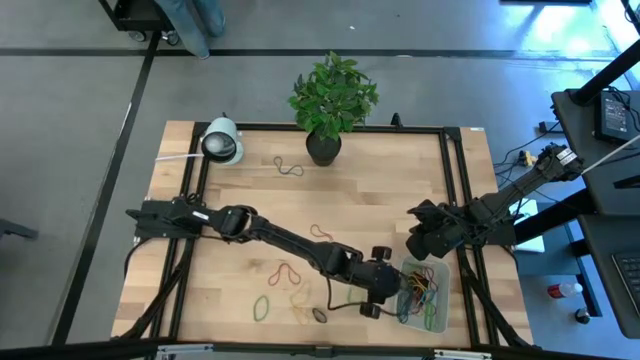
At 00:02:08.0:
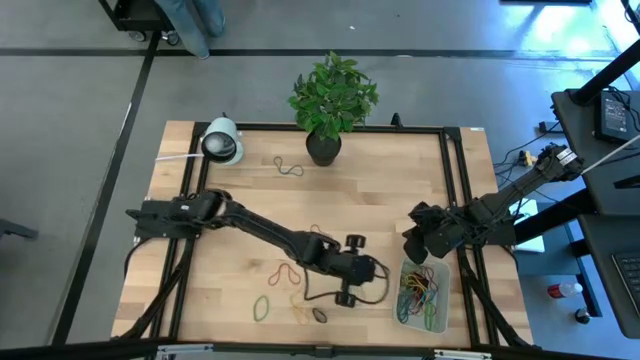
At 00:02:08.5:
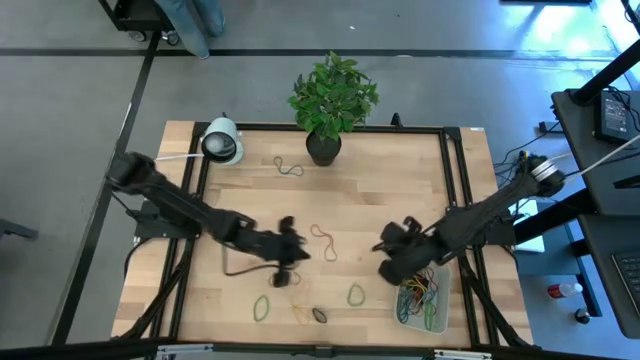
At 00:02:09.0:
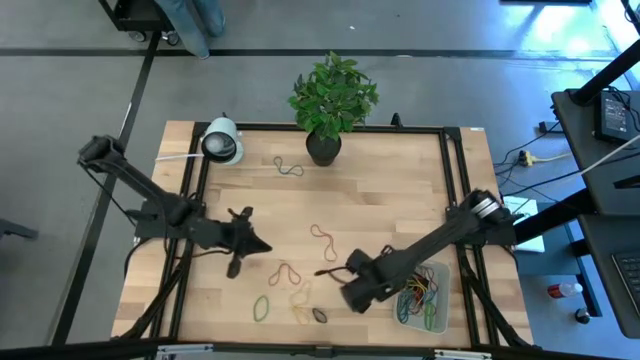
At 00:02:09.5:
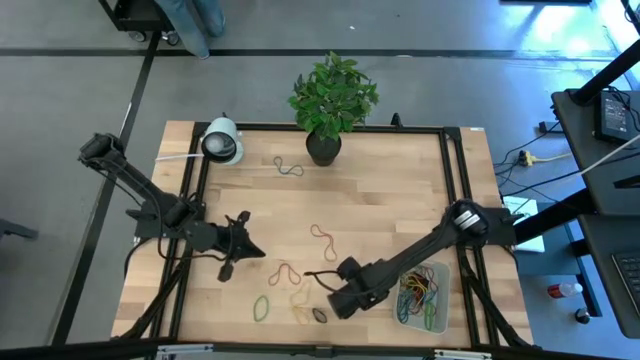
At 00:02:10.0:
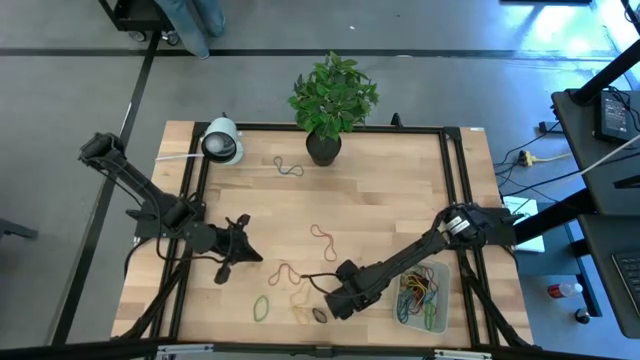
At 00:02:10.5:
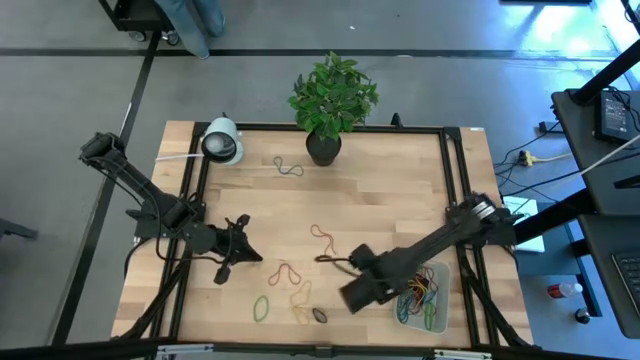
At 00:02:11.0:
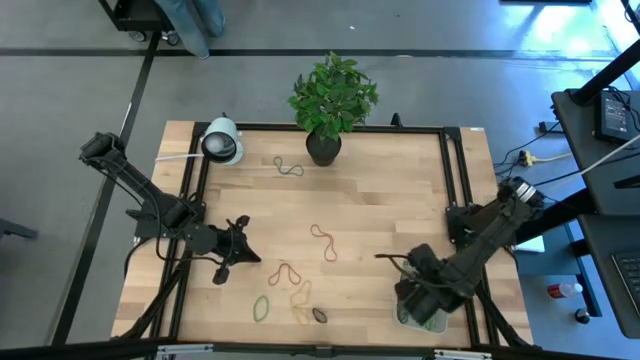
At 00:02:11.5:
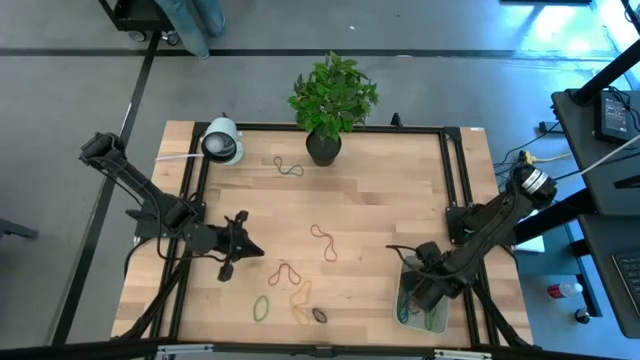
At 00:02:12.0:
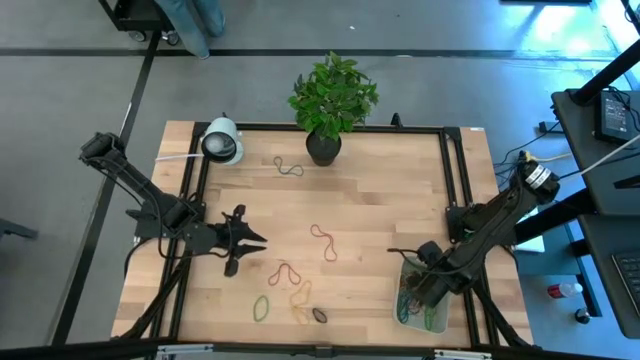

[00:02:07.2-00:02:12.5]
Task: Pick and place rubber bands into bin
Put the green rubber band into the gray bin

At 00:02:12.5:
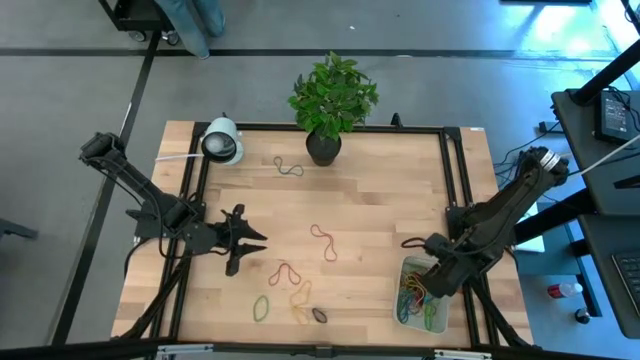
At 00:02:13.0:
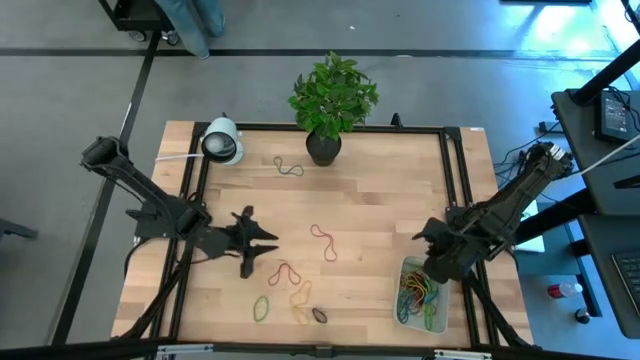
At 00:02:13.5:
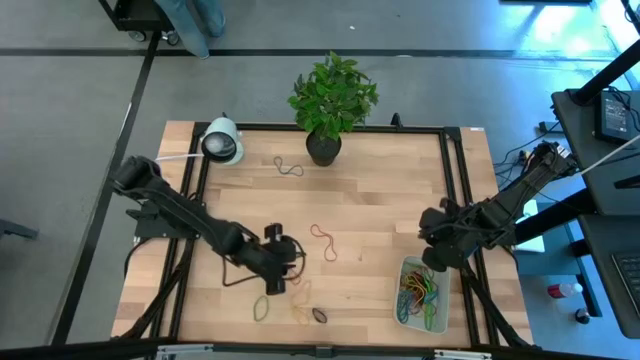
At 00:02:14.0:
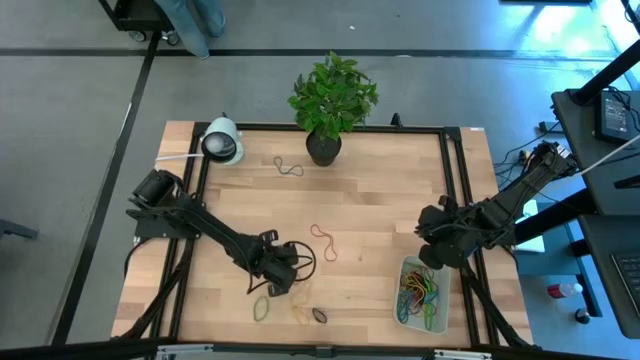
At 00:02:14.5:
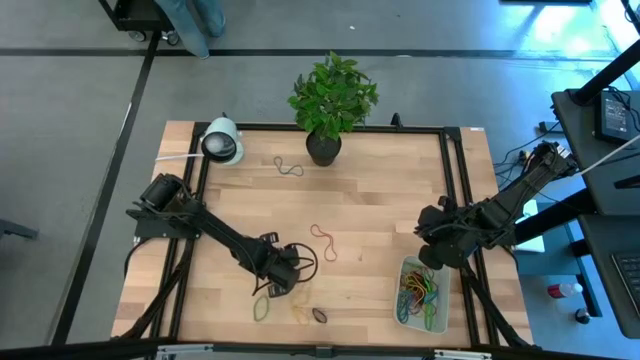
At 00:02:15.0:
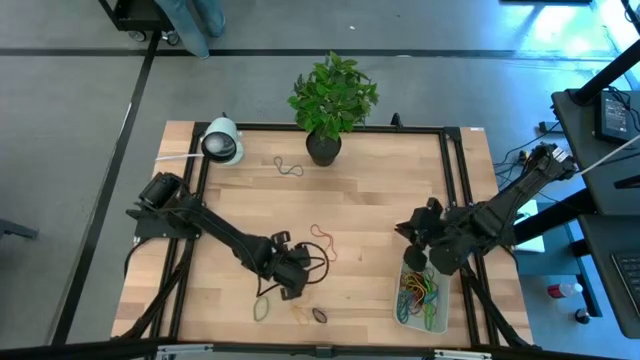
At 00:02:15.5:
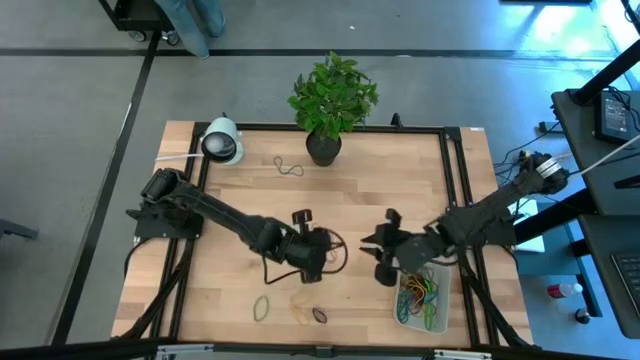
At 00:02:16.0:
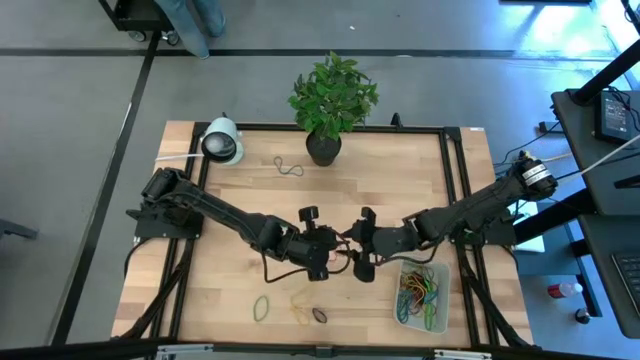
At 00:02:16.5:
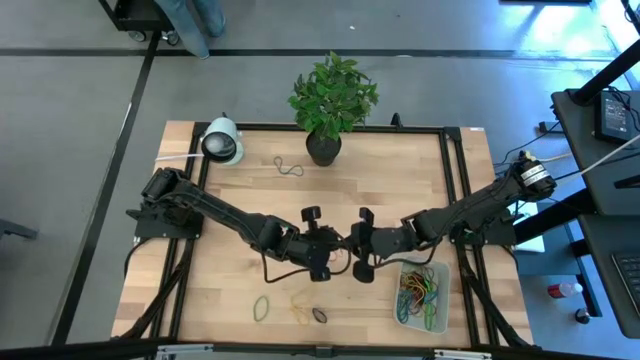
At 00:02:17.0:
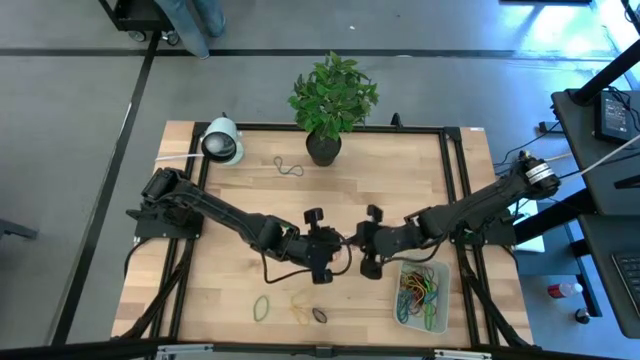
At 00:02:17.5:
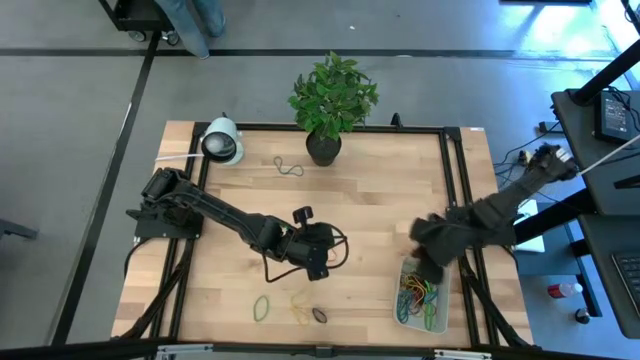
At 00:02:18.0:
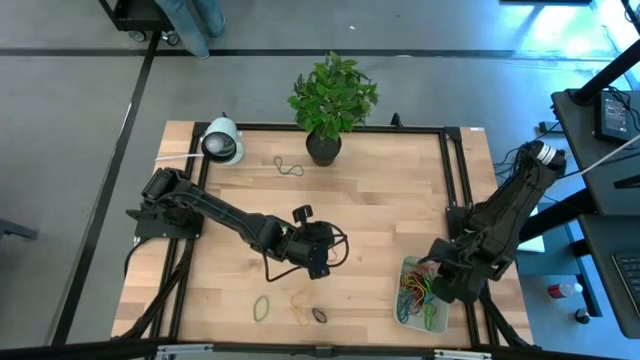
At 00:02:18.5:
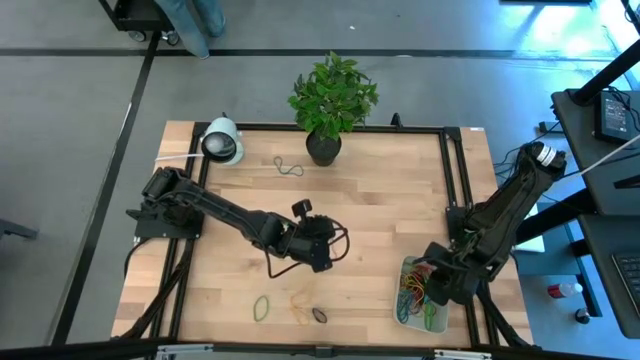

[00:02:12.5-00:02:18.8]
Put the red rubber band into the gray bin

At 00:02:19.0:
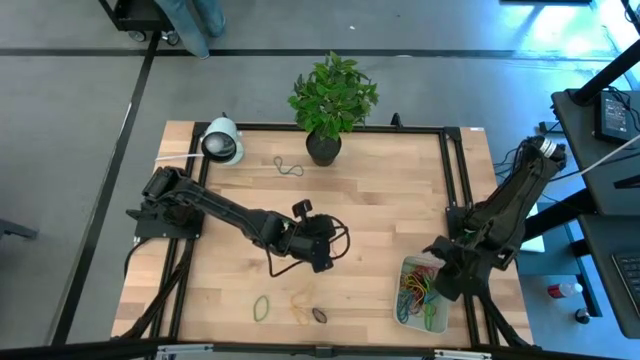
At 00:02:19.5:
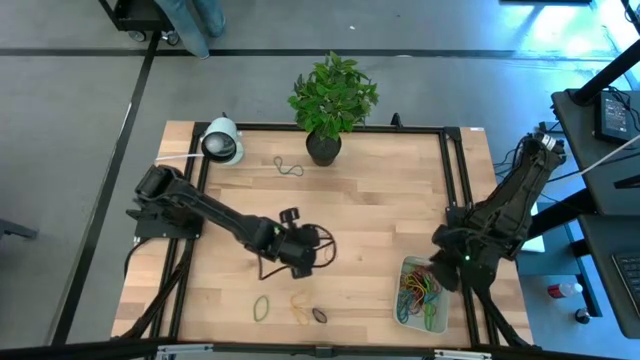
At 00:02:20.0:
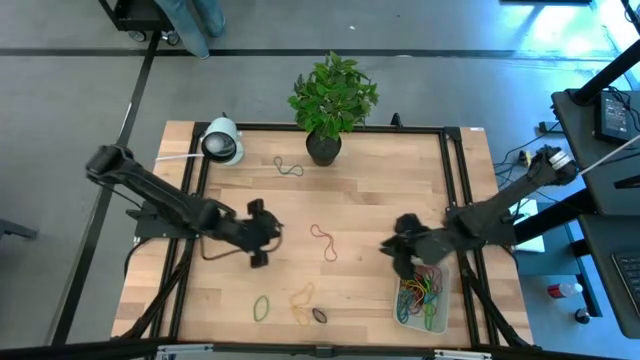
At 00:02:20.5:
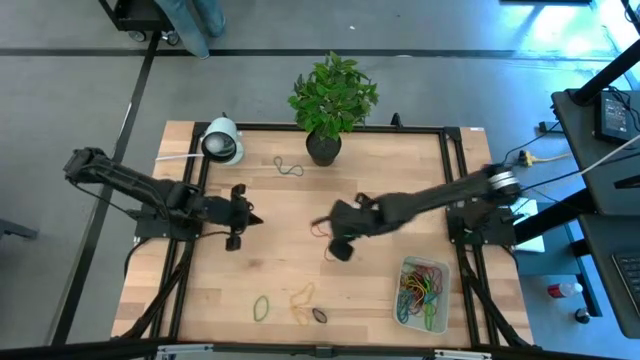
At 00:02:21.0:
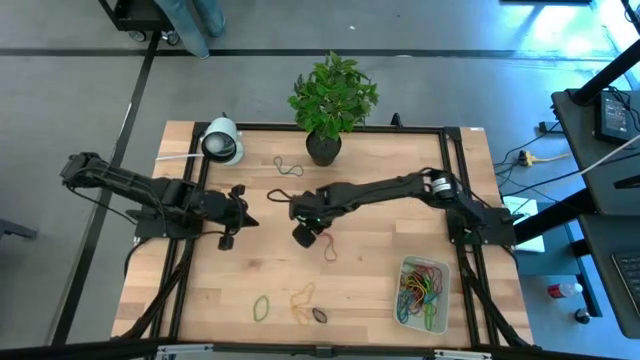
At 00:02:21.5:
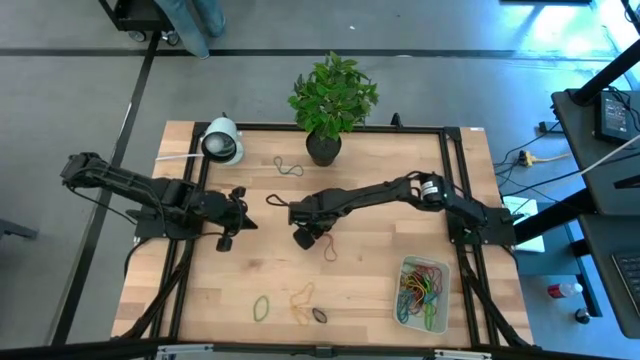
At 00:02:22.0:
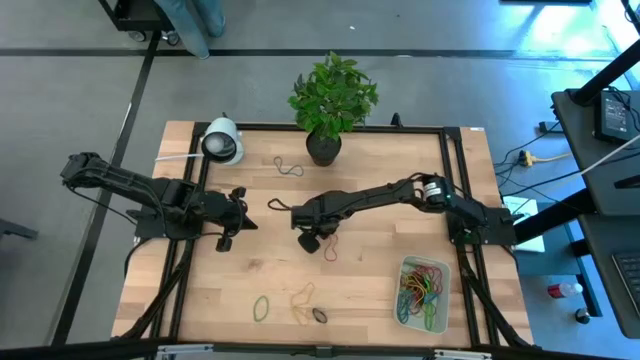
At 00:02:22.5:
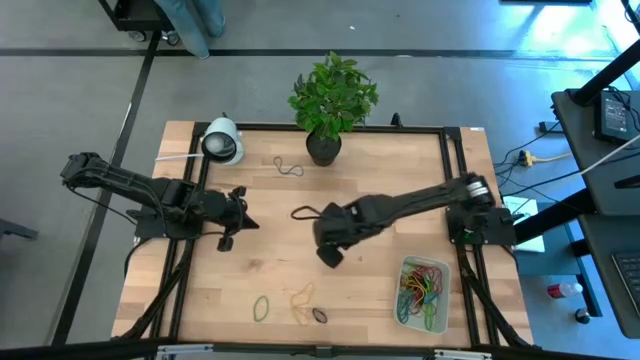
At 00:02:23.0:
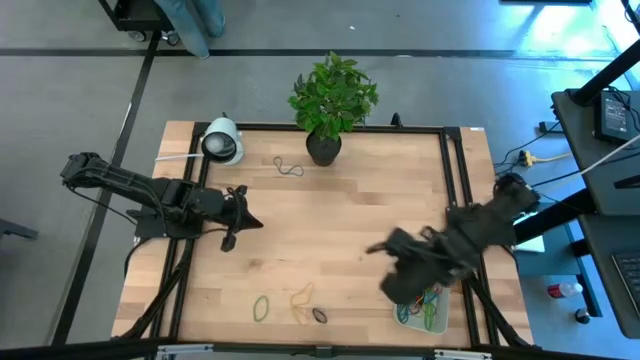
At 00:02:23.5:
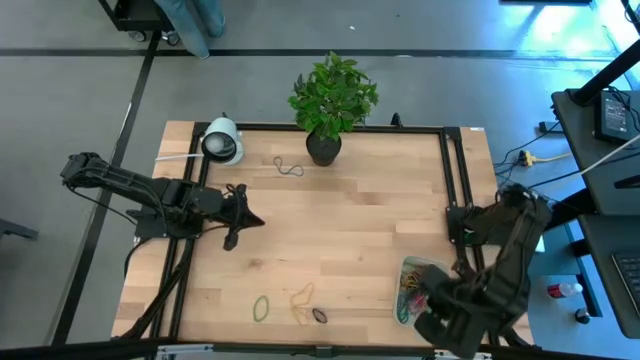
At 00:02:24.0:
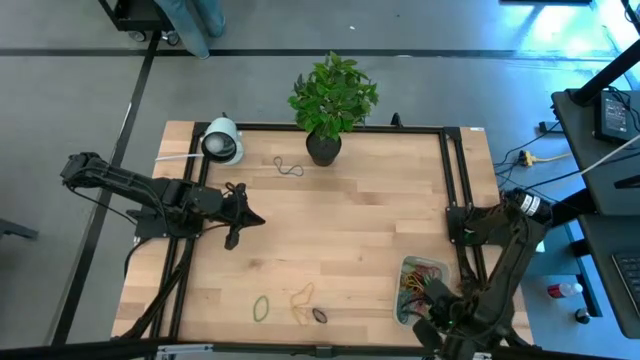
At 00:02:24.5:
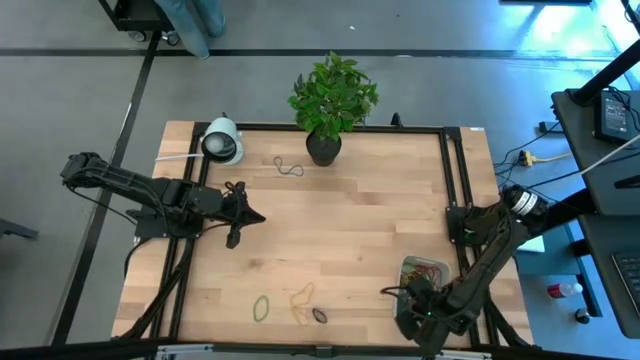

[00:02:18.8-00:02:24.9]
Put the red rubber band into the gray bin

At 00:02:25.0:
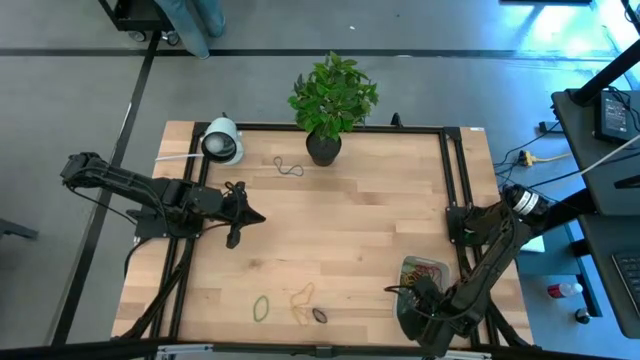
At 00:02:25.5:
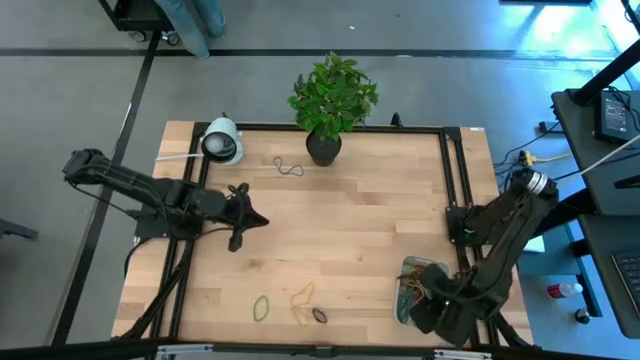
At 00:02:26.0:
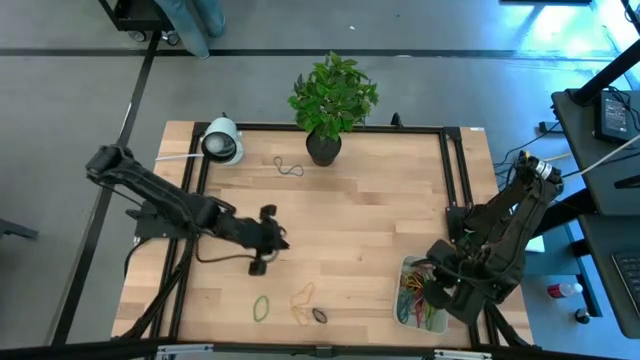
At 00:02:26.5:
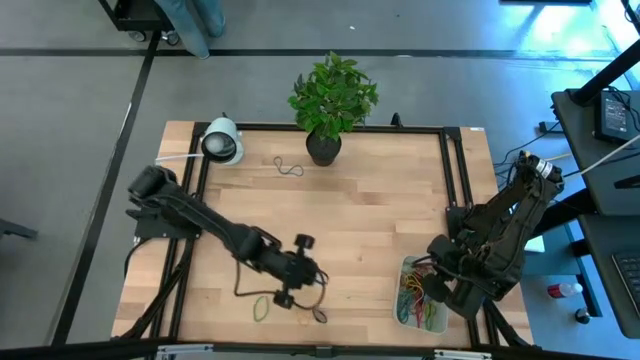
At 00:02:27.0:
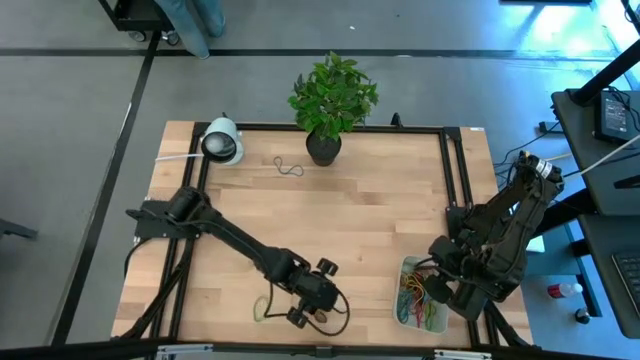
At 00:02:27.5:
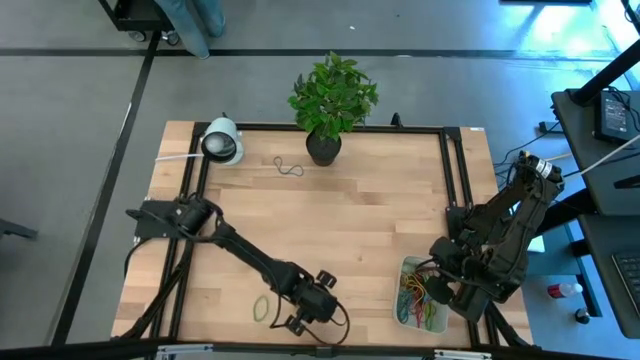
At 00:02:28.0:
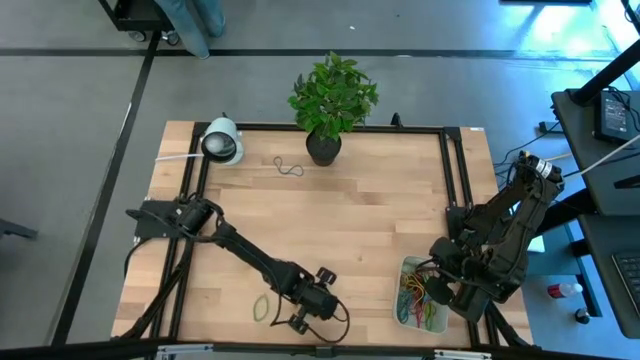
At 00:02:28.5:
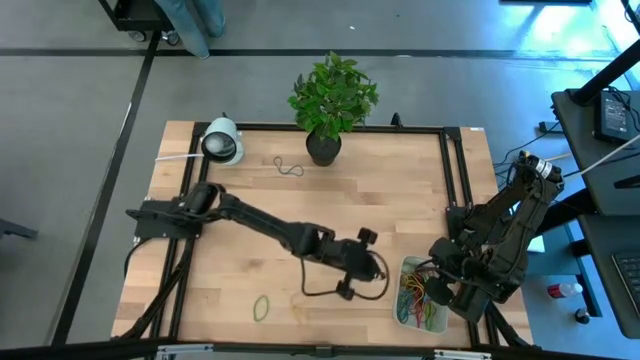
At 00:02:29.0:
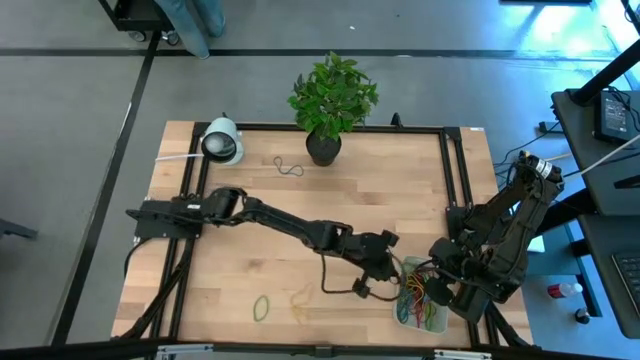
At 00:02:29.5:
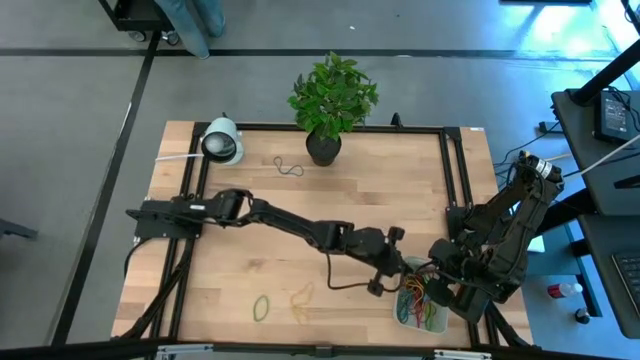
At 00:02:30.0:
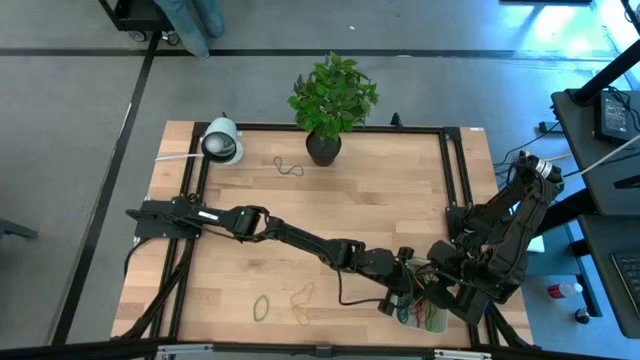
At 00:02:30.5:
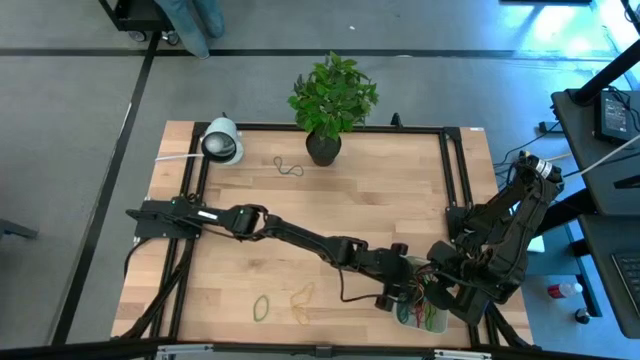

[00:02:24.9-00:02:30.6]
Put the black rubber band into the gray bin
